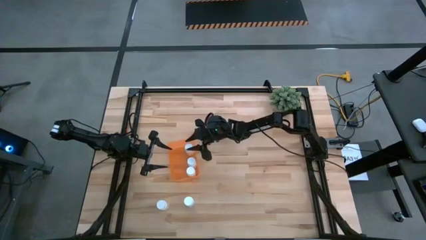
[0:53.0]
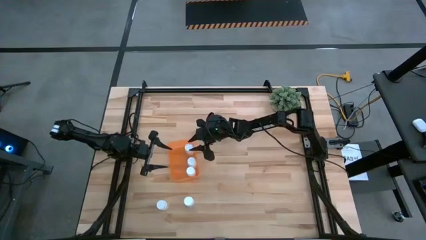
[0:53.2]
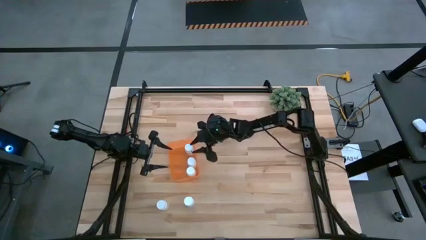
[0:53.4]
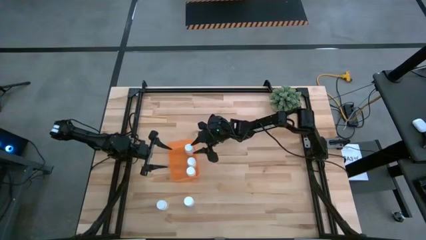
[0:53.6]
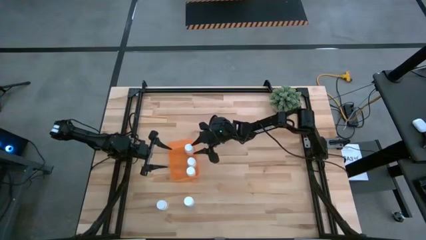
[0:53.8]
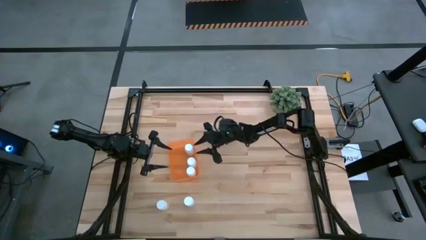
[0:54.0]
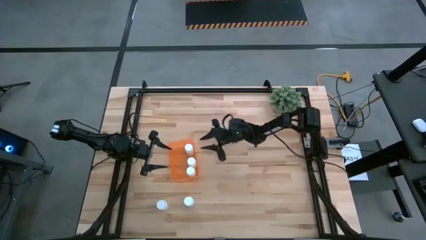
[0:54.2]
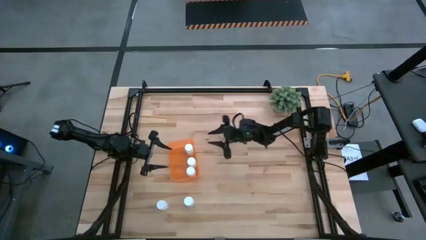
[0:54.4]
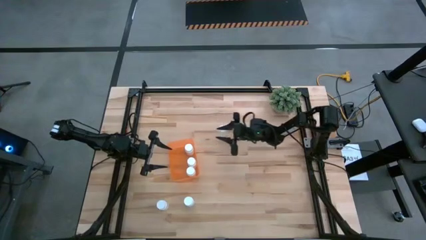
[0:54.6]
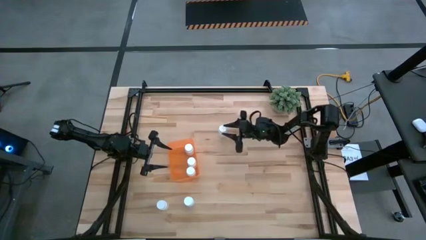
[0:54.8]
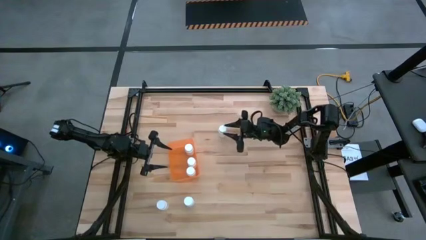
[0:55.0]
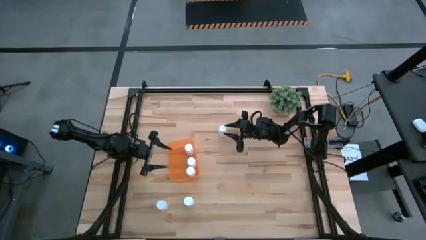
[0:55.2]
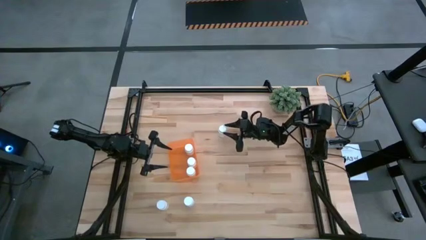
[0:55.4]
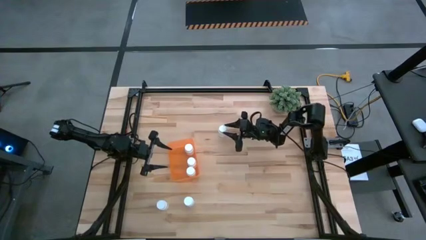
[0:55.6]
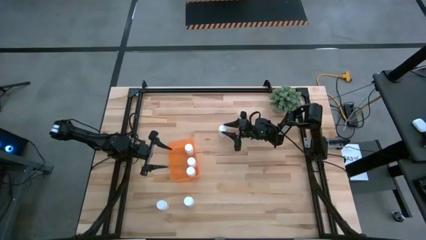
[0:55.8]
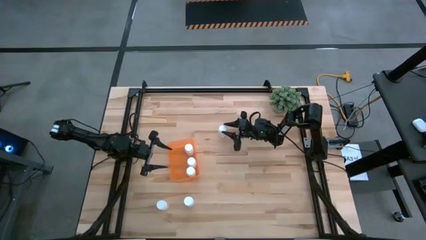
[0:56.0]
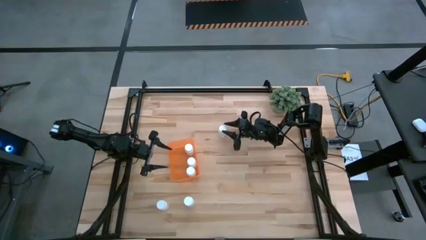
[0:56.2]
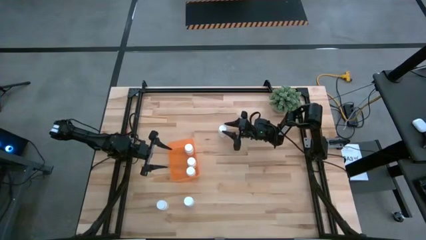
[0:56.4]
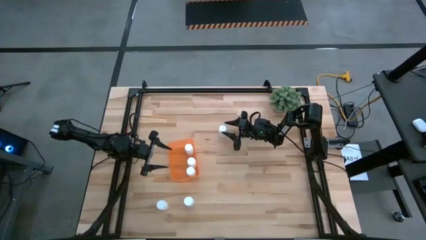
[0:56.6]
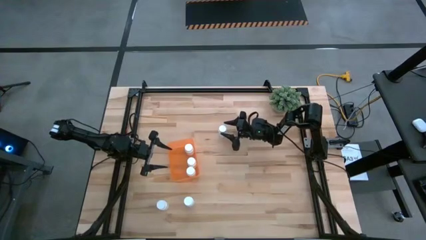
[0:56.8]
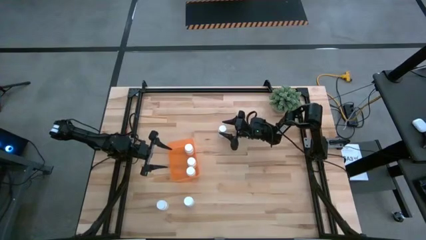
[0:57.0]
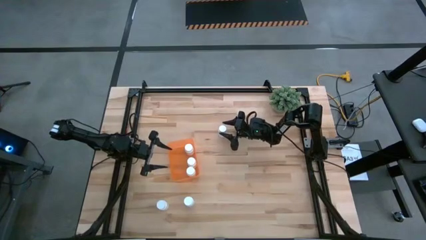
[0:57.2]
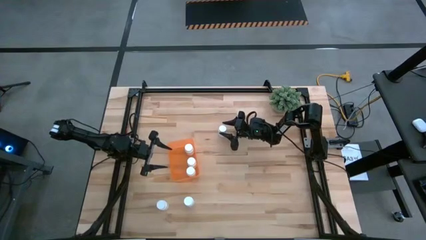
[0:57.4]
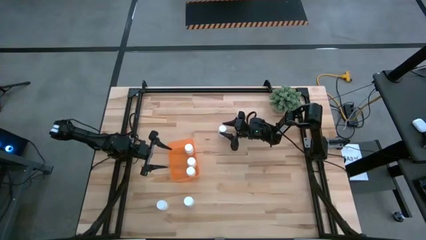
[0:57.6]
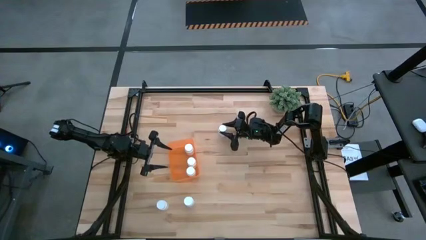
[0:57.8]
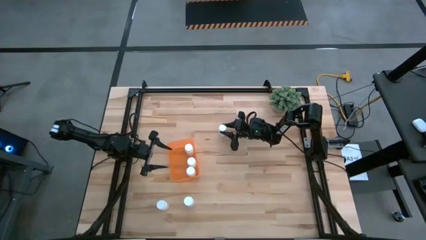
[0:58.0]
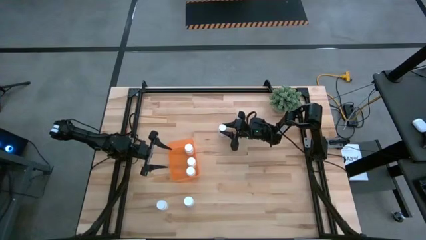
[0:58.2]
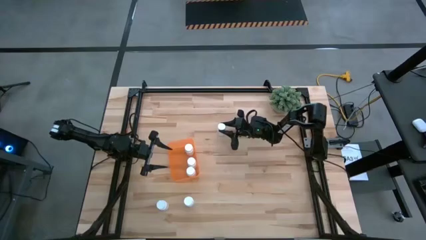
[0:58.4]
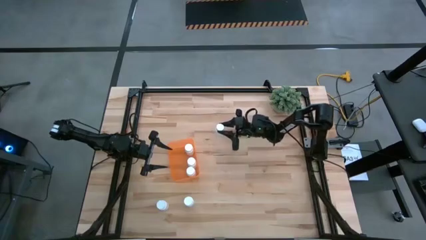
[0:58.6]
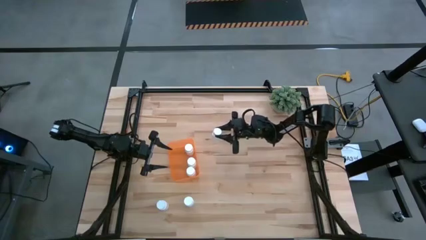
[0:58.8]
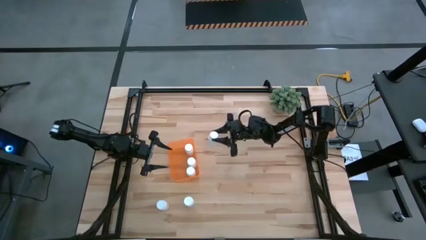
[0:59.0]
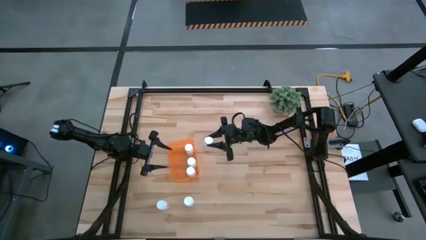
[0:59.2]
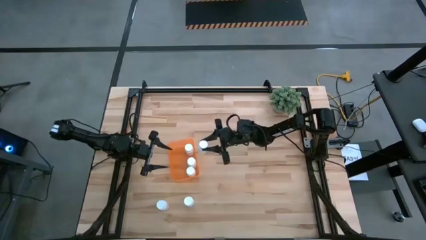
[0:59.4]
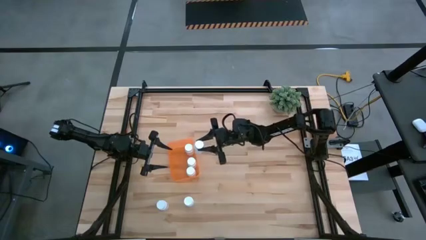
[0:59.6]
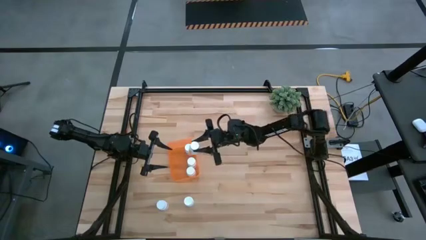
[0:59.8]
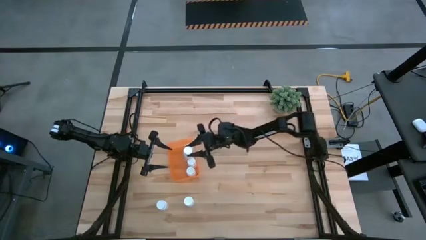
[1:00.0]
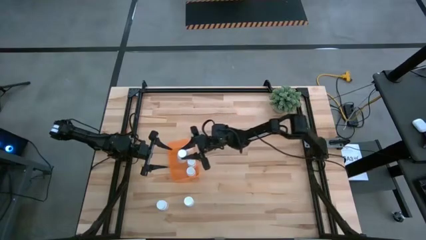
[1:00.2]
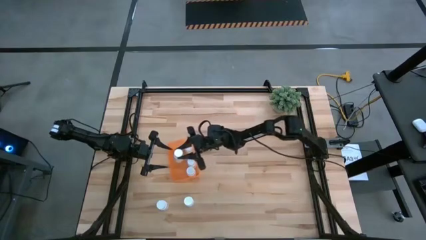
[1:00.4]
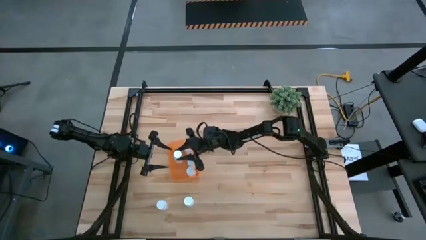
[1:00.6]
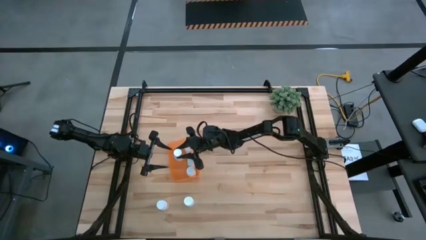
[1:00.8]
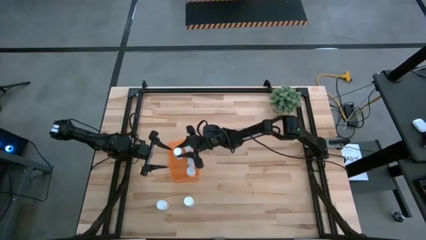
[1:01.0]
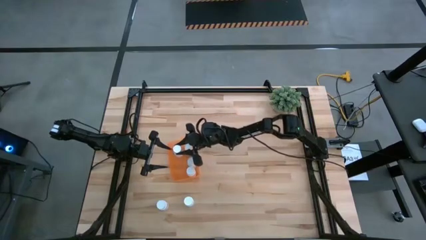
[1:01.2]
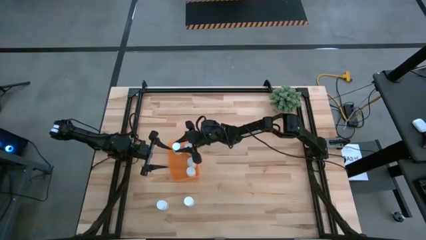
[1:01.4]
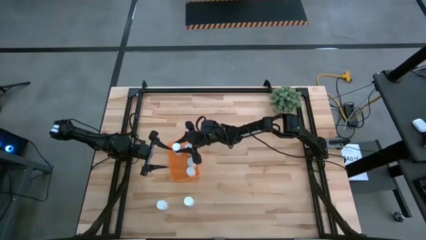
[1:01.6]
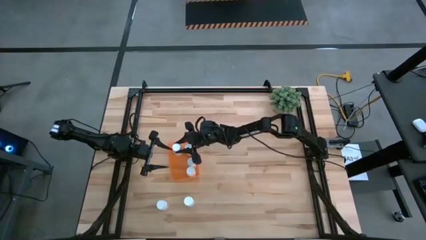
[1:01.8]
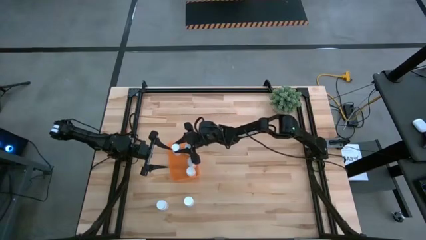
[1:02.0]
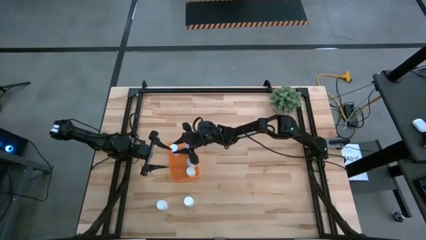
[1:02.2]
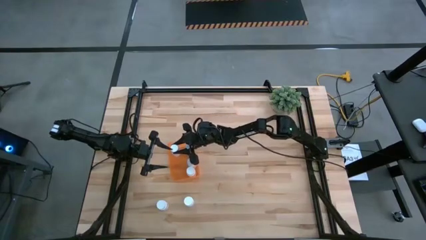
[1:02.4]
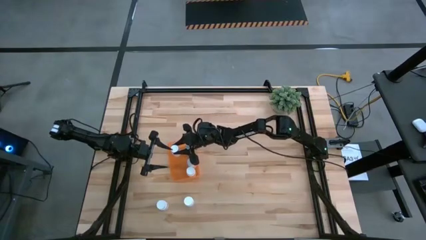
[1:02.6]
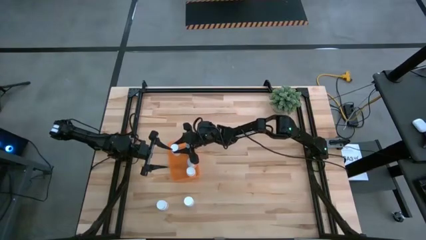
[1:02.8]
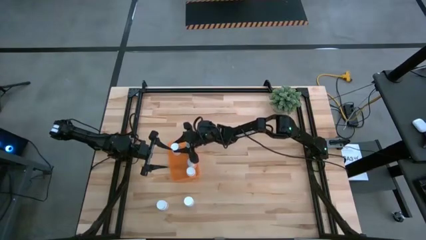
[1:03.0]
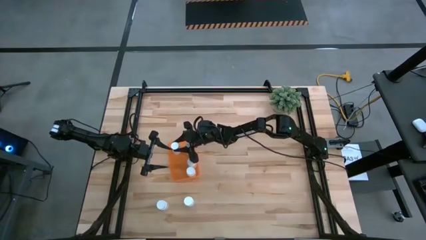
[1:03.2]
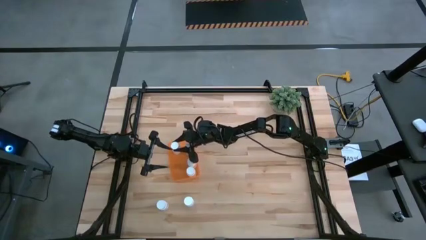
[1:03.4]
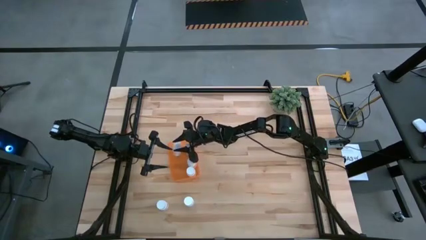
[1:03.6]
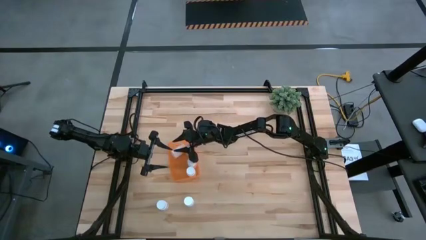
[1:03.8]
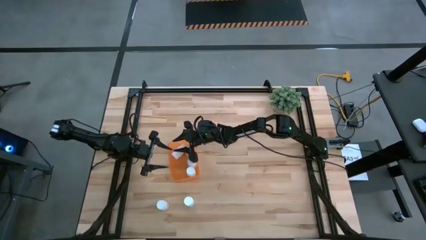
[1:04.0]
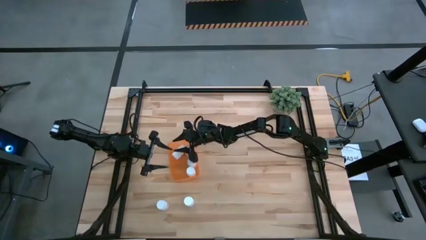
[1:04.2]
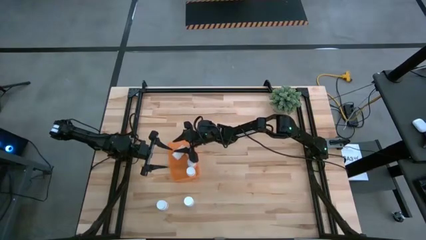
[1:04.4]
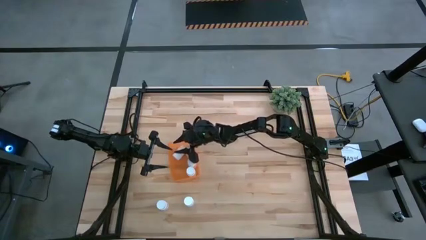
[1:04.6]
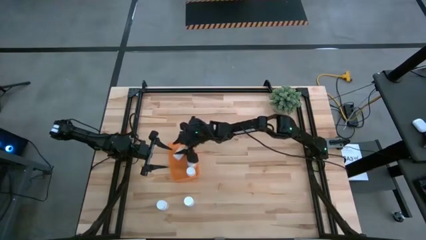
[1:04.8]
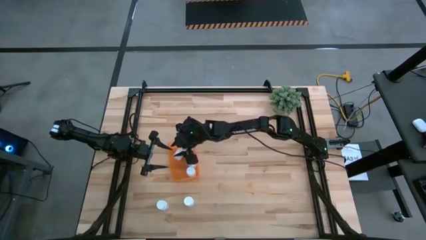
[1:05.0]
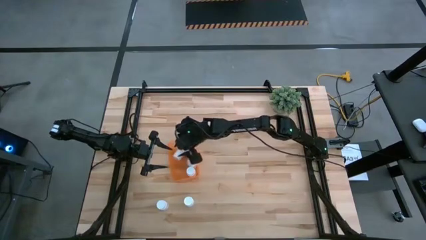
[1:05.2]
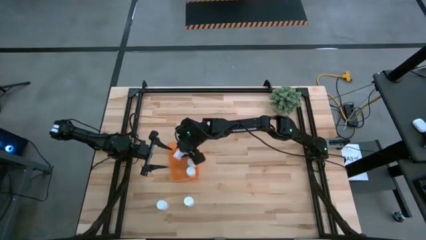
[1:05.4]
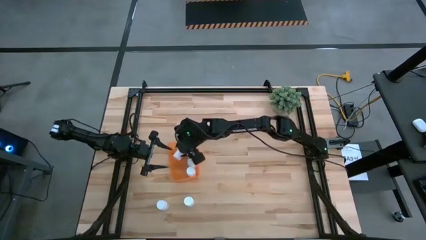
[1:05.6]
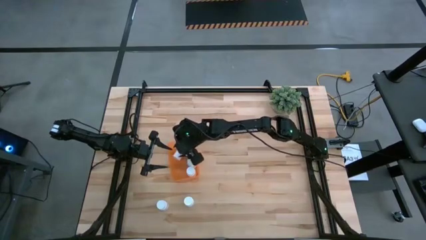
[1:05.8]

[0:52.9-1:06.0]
Task: Pick and place pill bottles into a basket
Put the top right white medicine bottle into the orange bin
